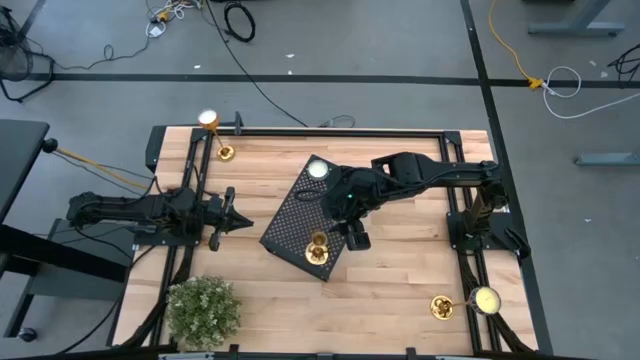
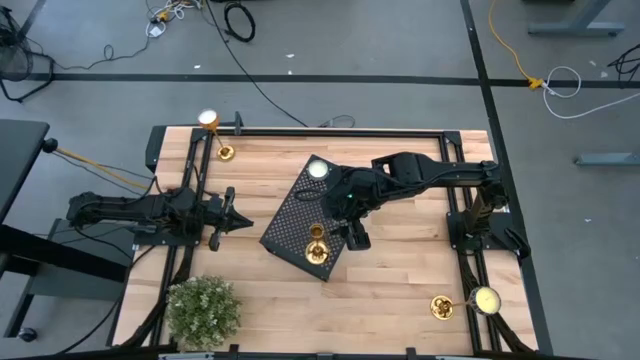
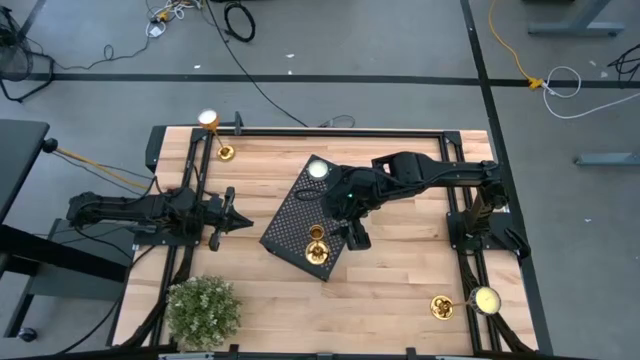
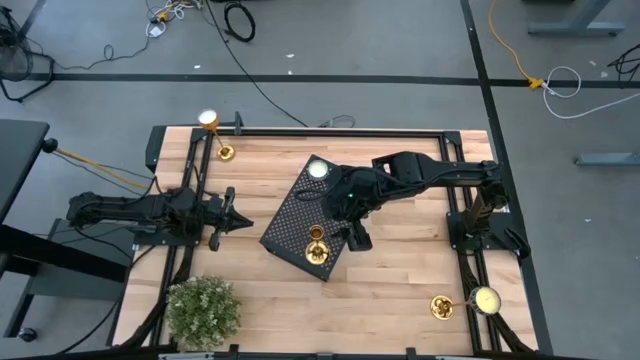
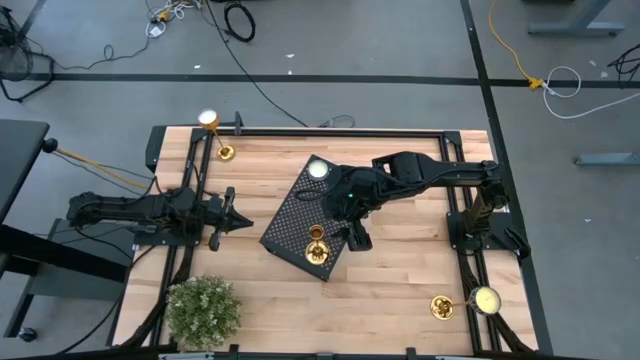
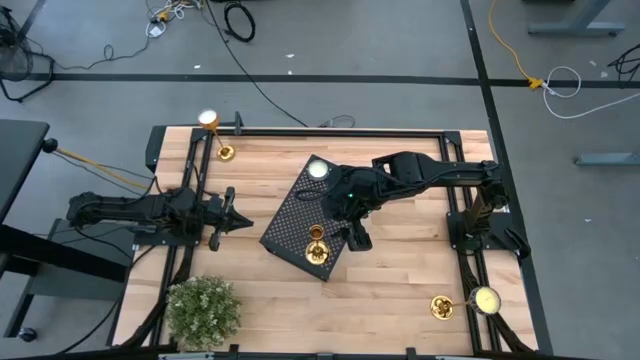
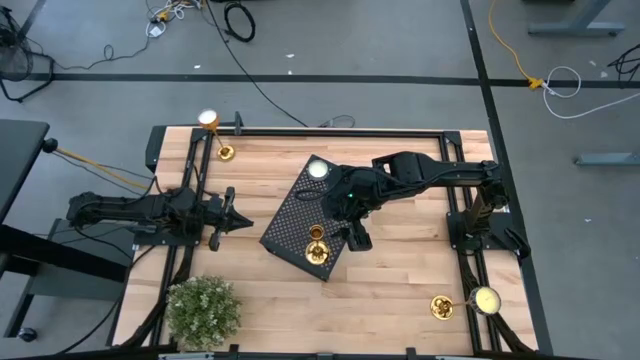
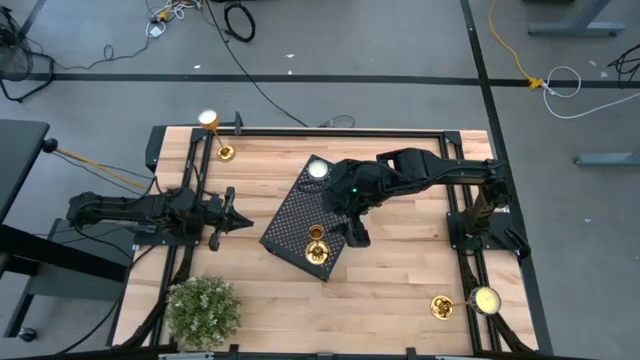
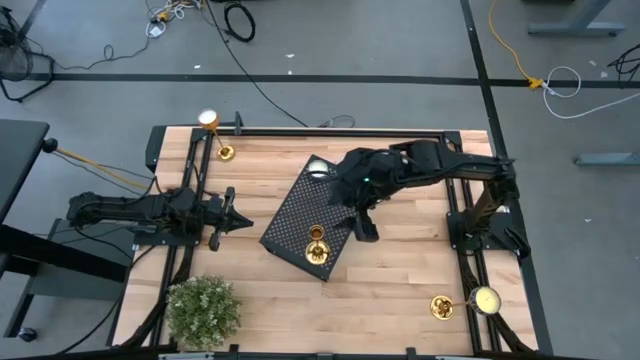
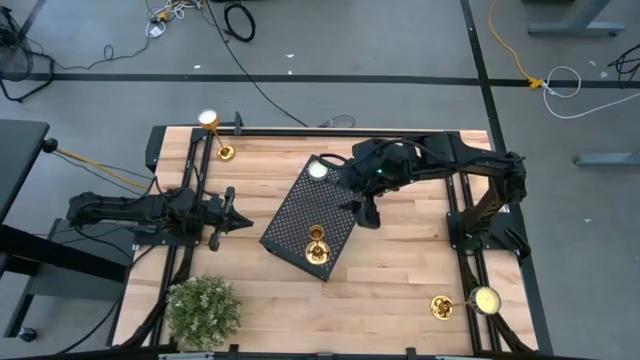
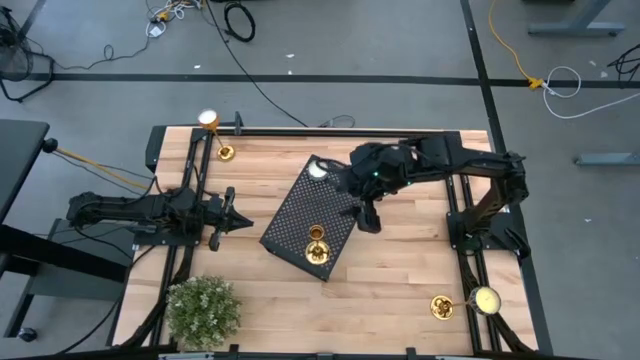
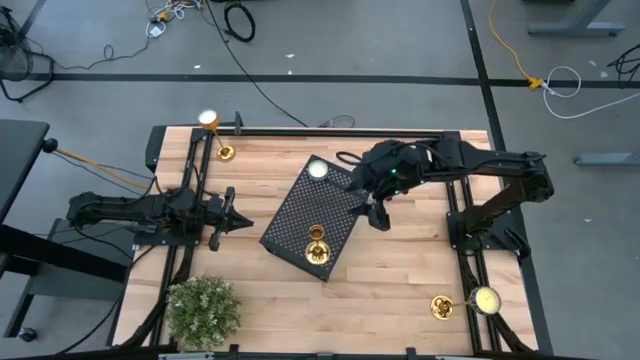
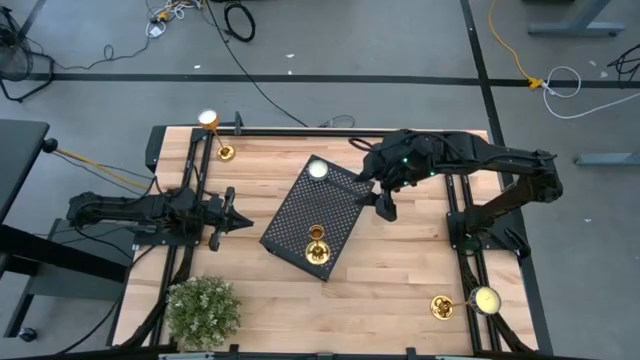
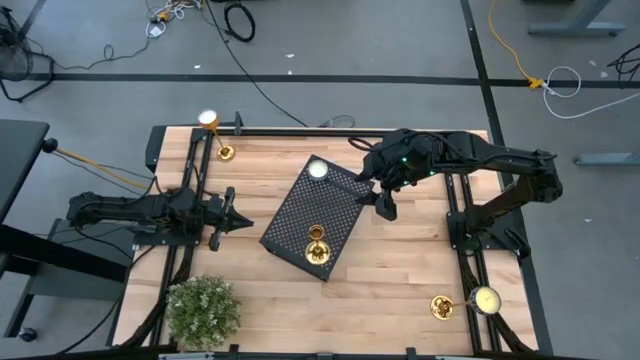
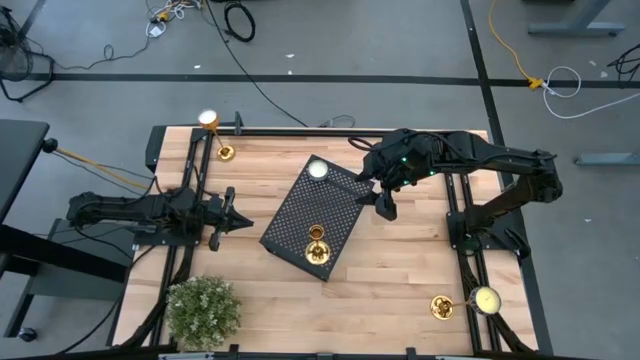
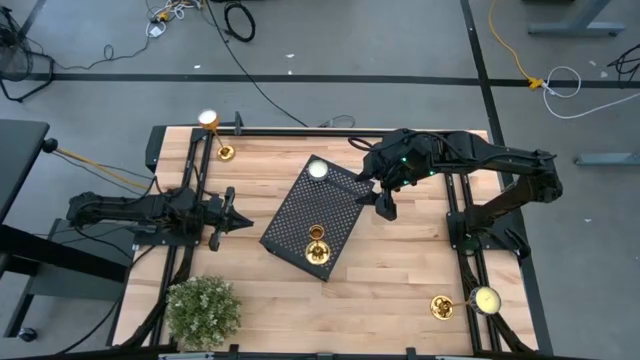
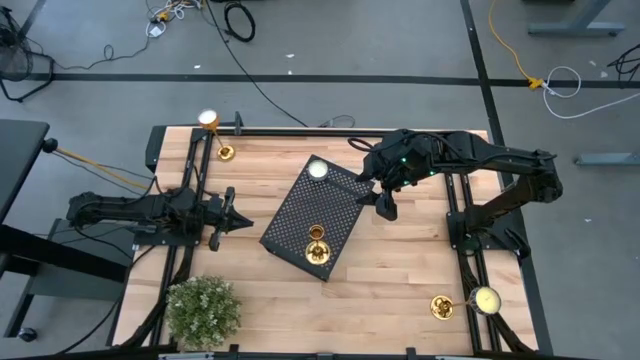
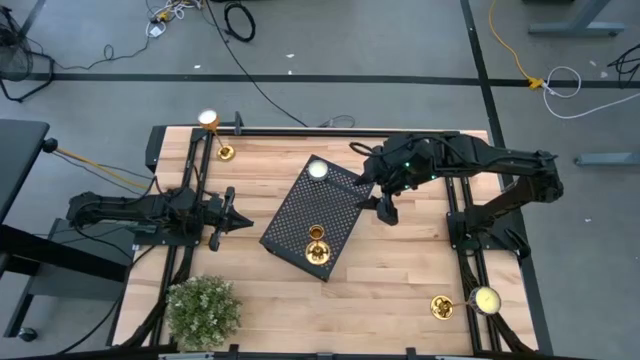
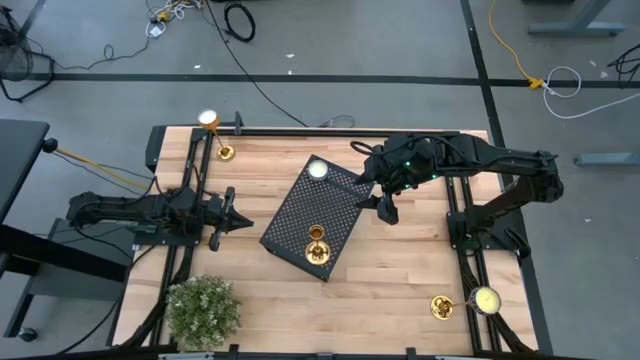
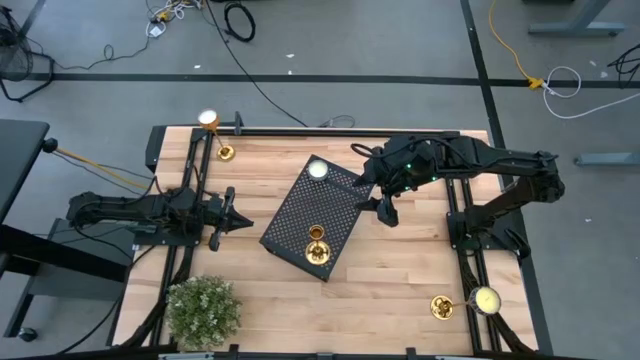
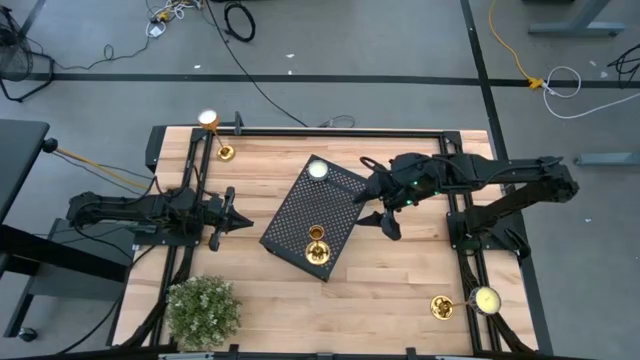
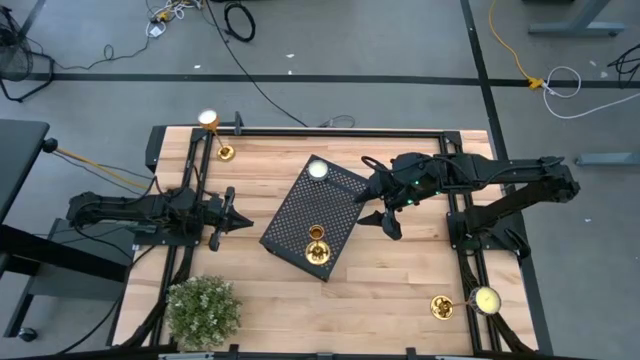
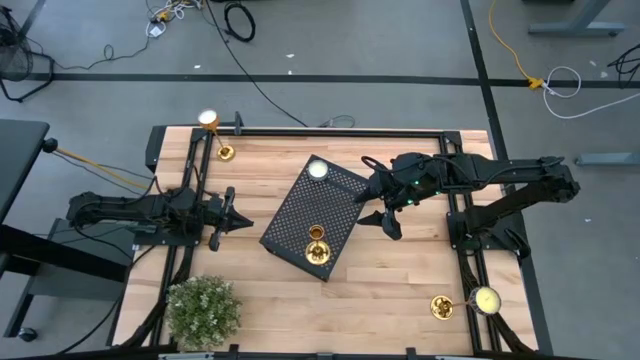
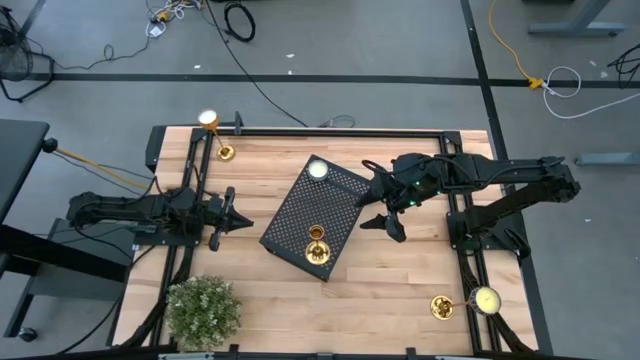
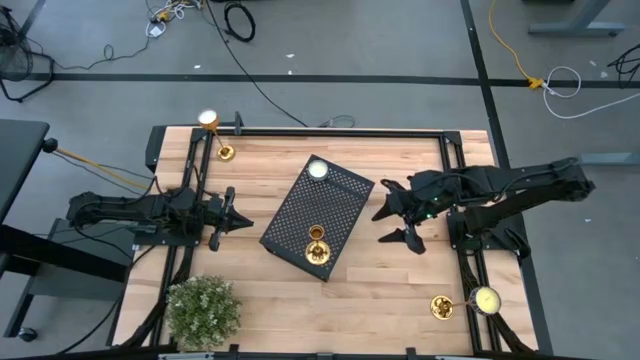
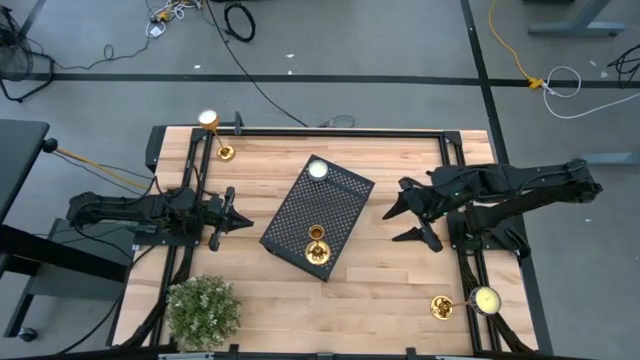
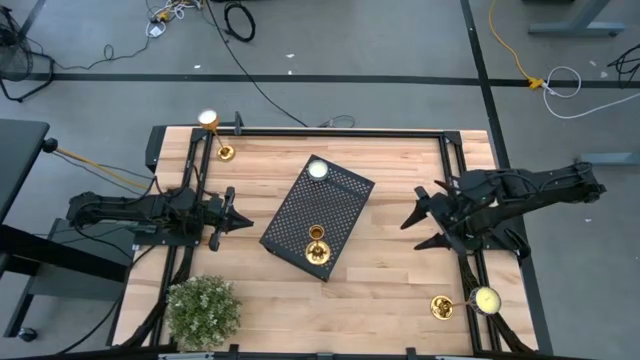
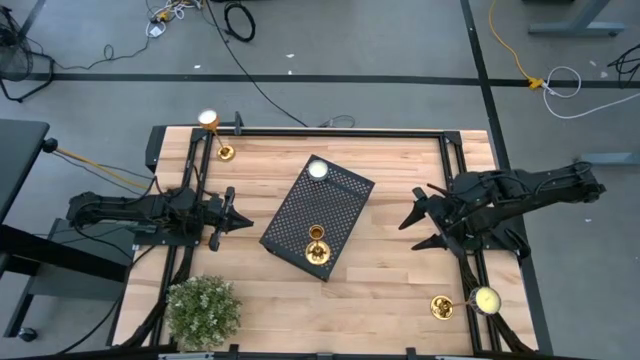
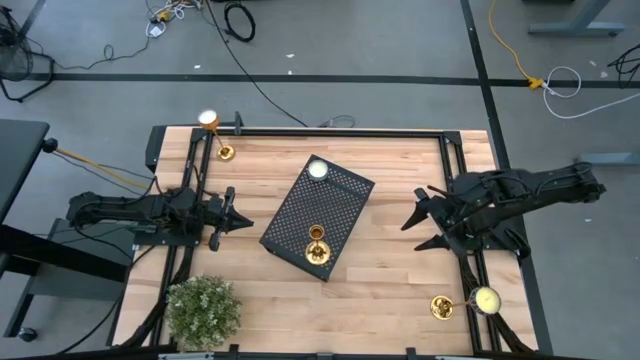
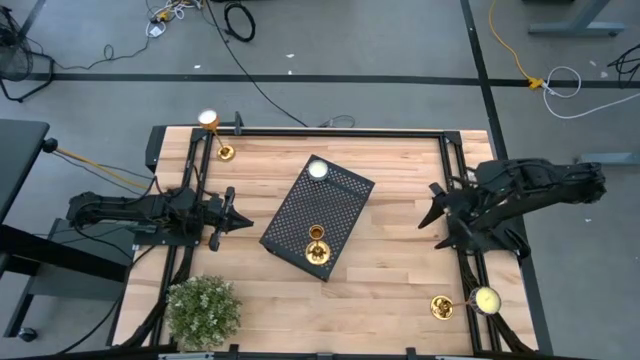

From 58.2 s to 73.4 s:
Task: Stock candles on shelf
Put the red scented candle on the shelf

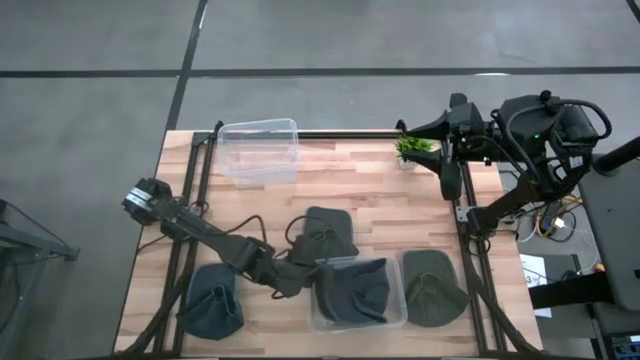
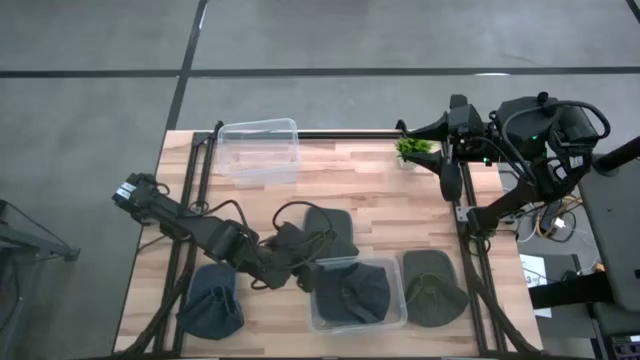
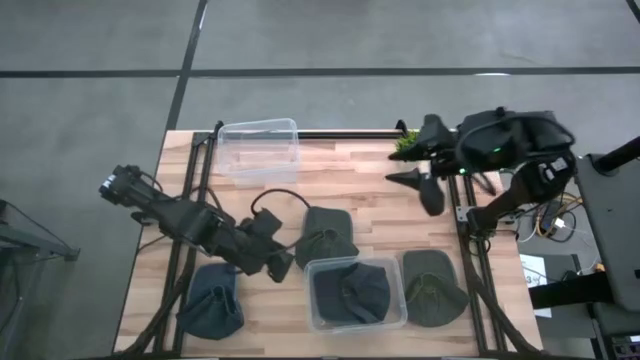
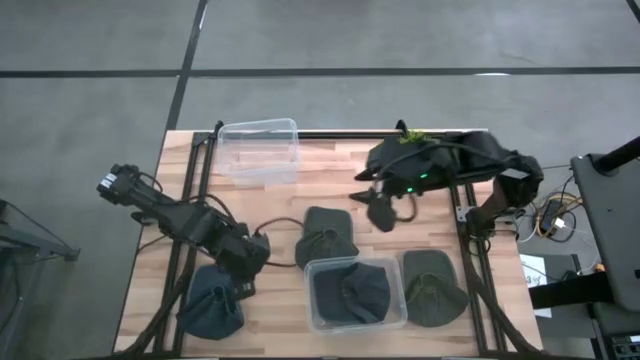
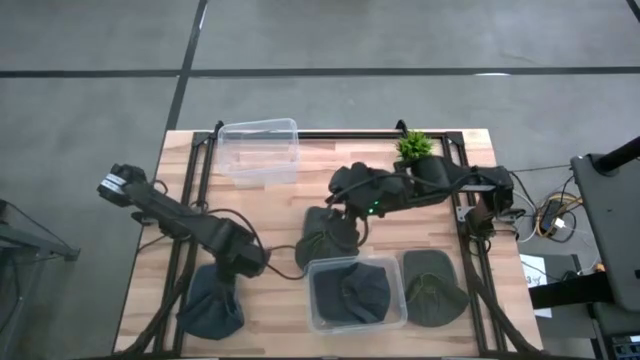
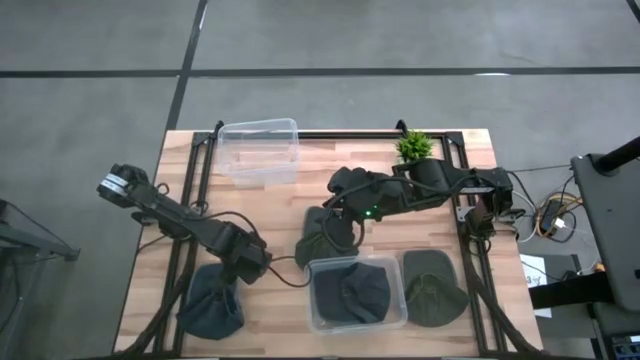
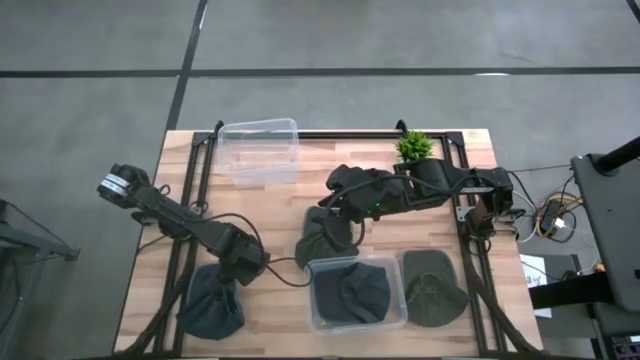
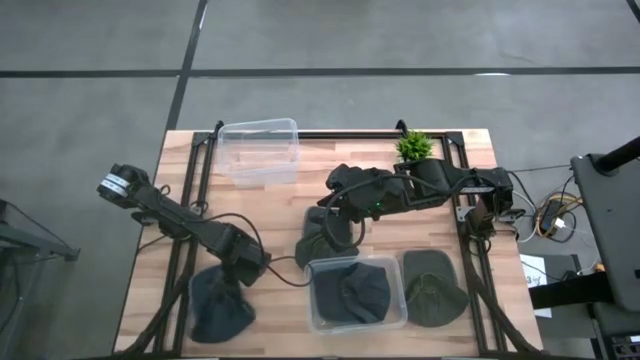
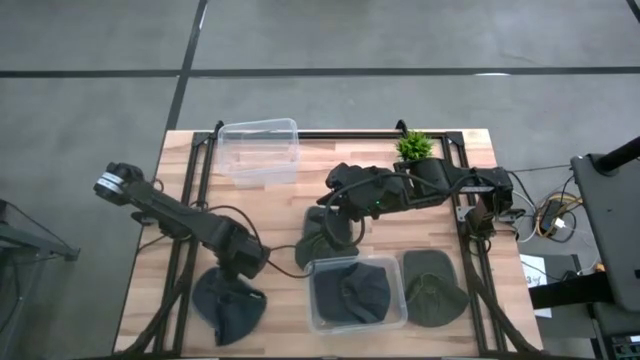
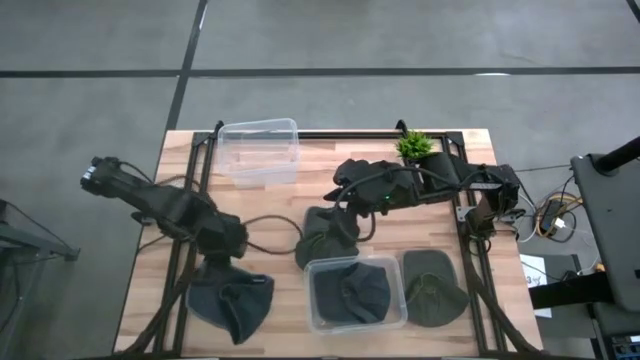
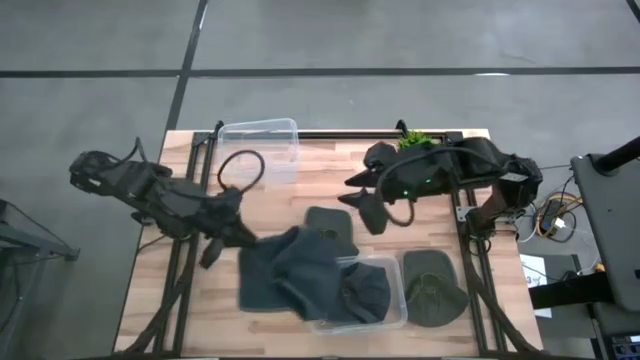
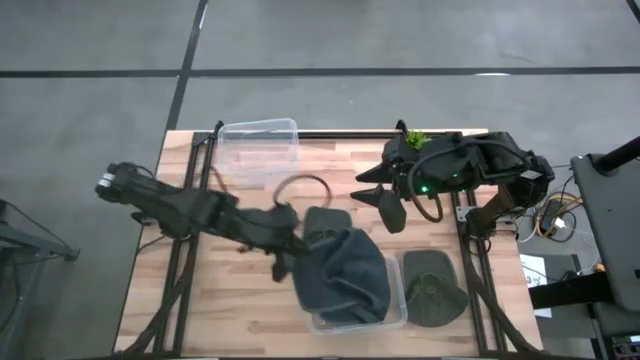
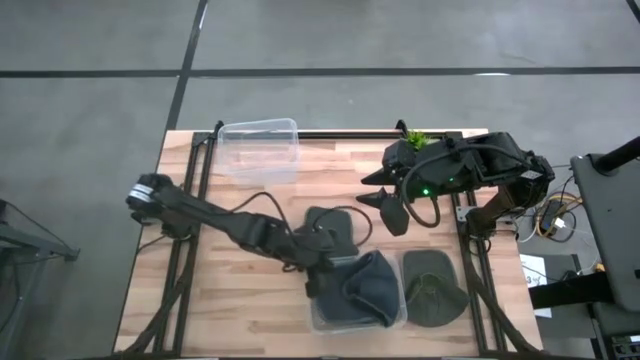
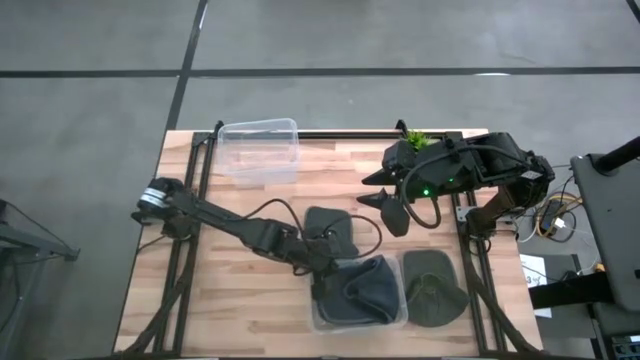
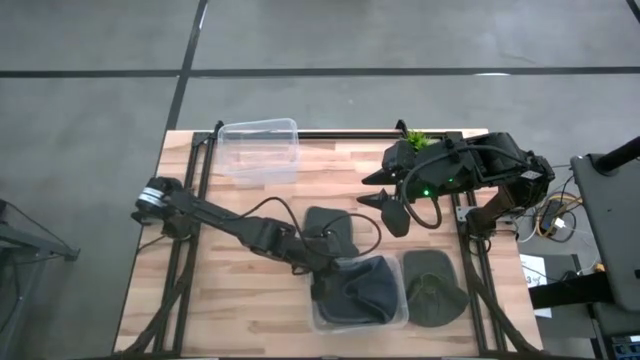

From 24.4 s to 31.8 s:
Task: Pick & Place hat
Put the blue cap into the bottom transparent bin
